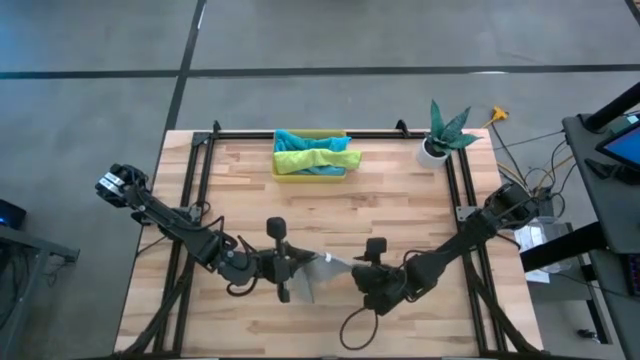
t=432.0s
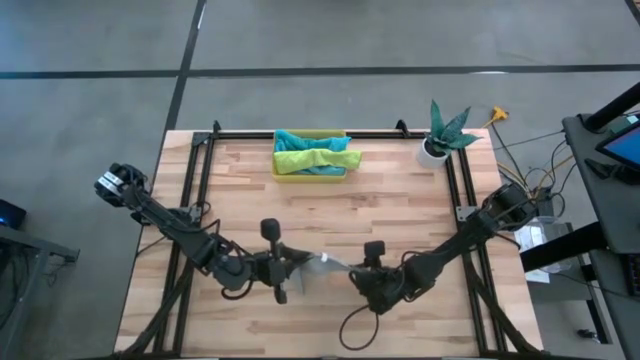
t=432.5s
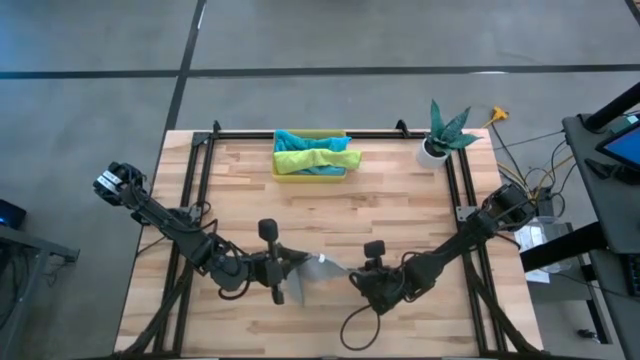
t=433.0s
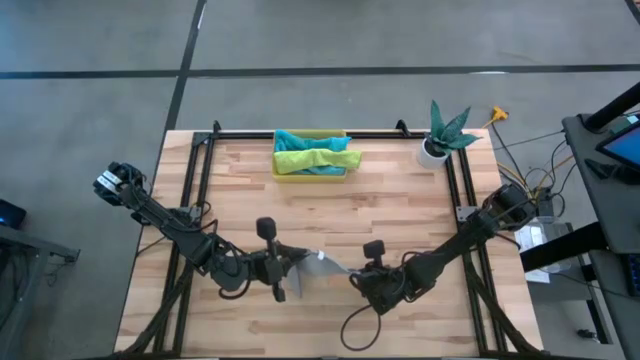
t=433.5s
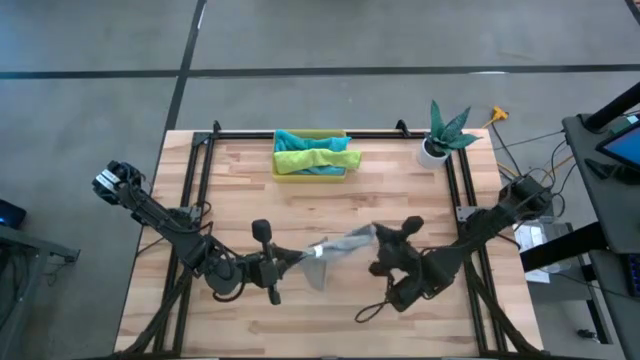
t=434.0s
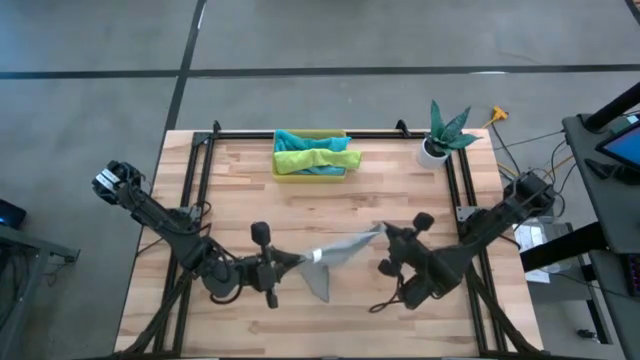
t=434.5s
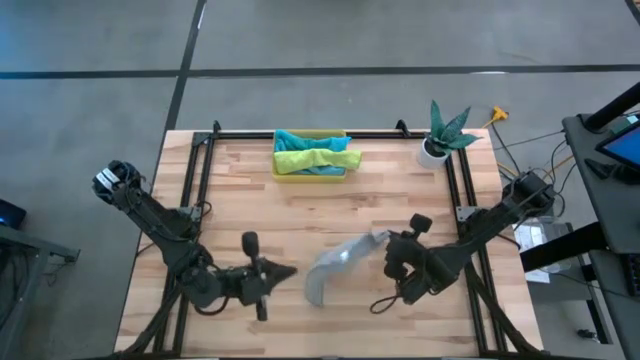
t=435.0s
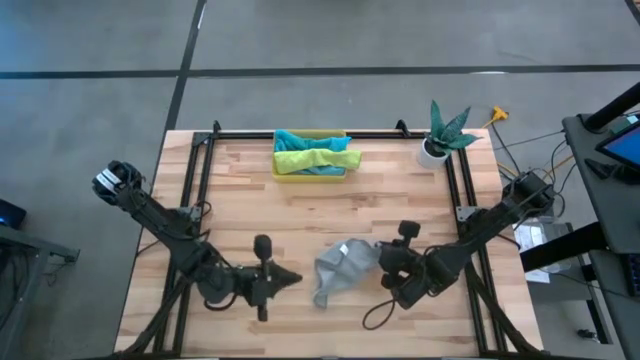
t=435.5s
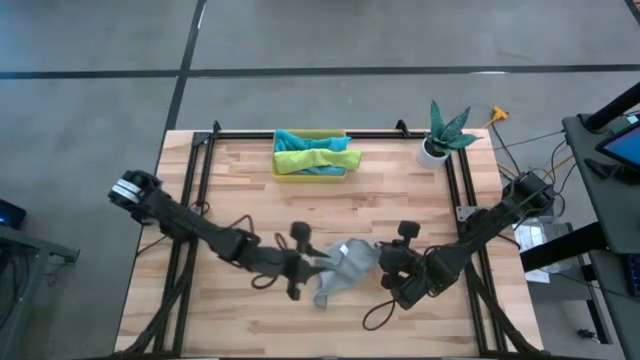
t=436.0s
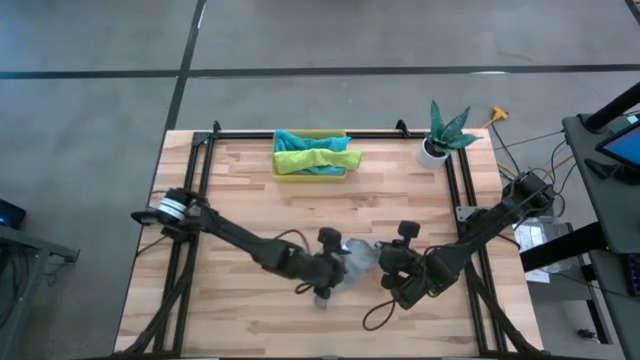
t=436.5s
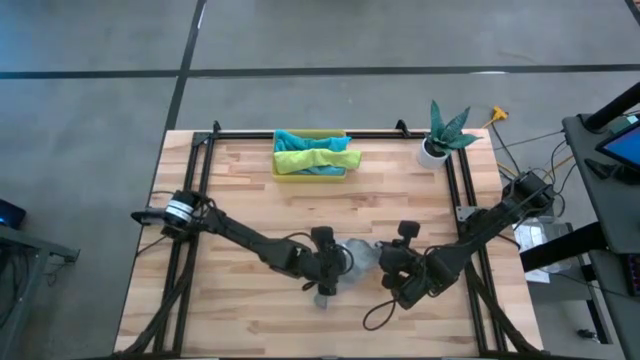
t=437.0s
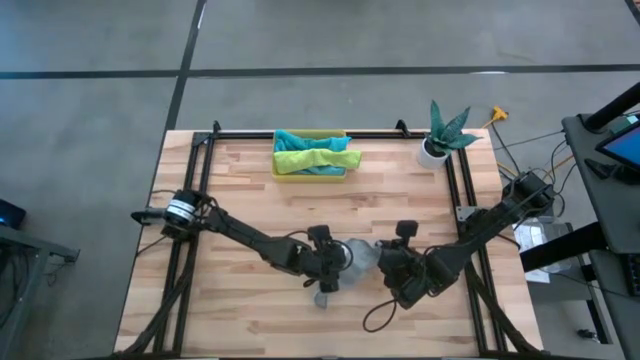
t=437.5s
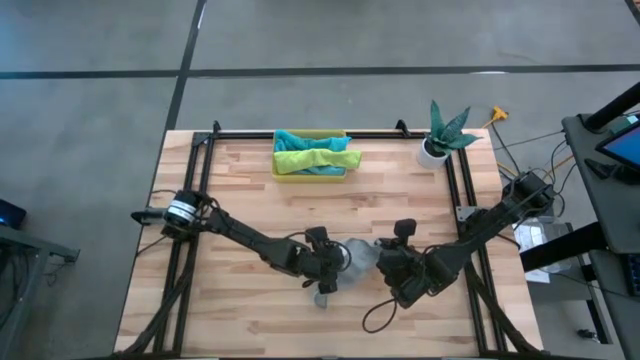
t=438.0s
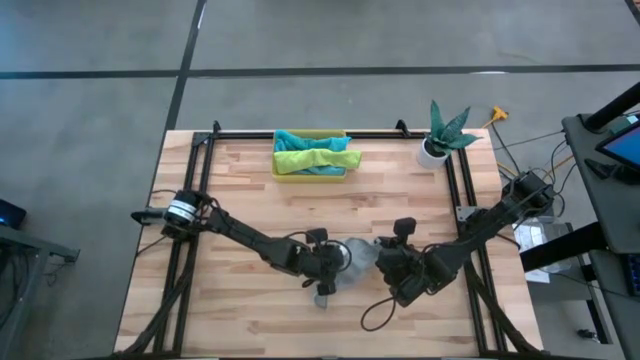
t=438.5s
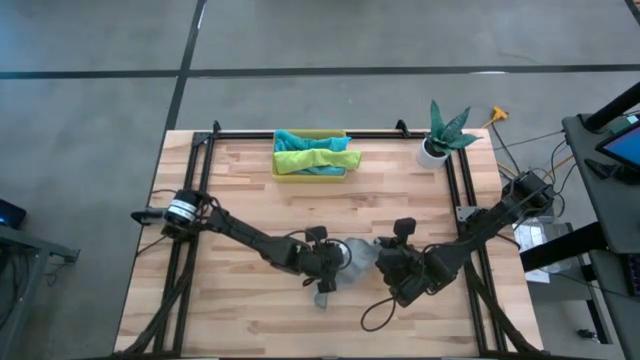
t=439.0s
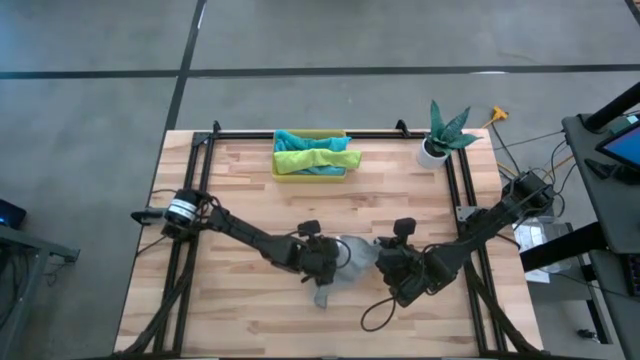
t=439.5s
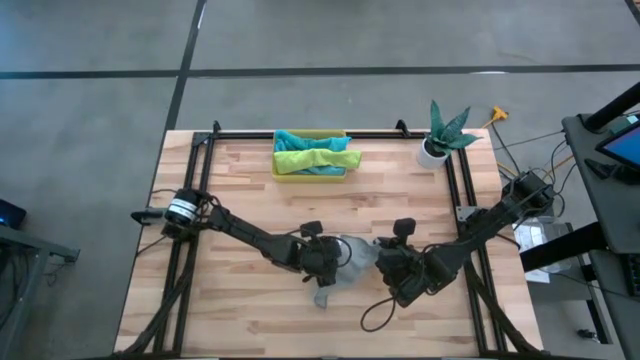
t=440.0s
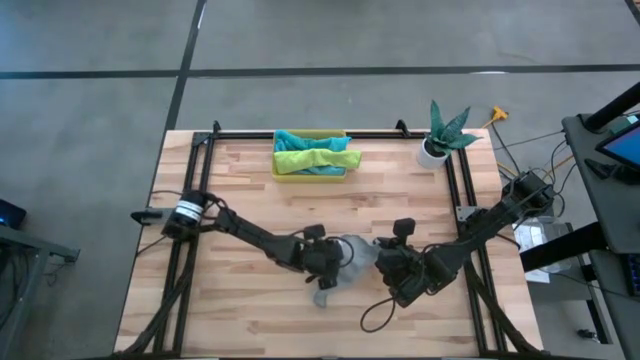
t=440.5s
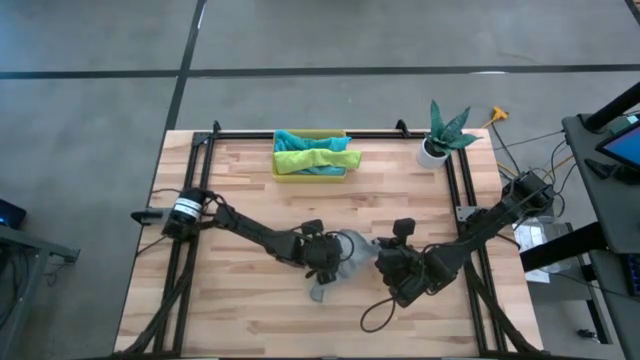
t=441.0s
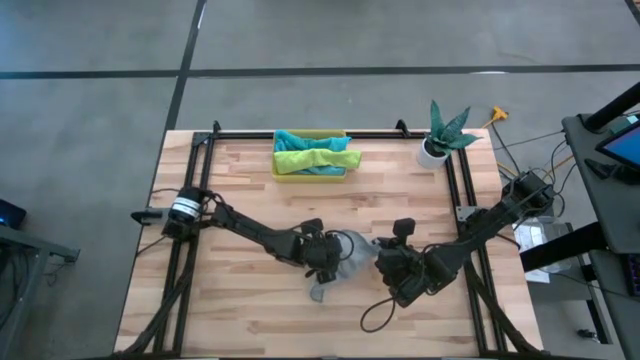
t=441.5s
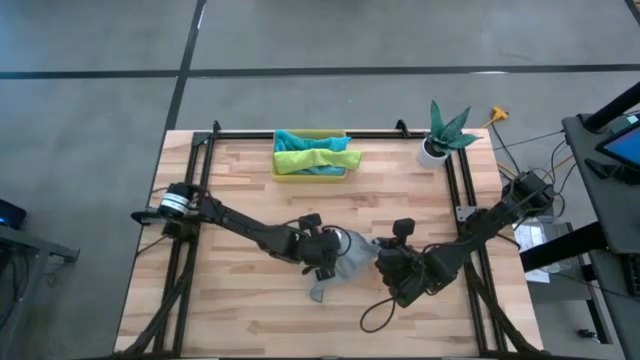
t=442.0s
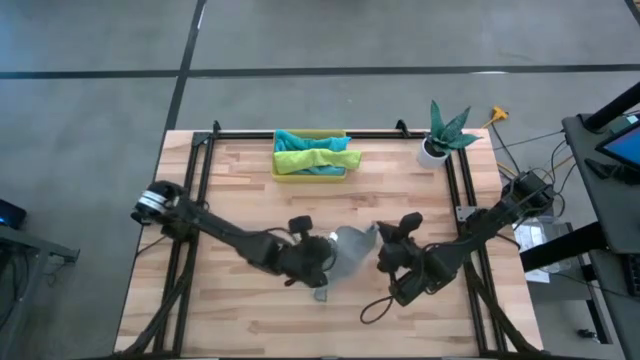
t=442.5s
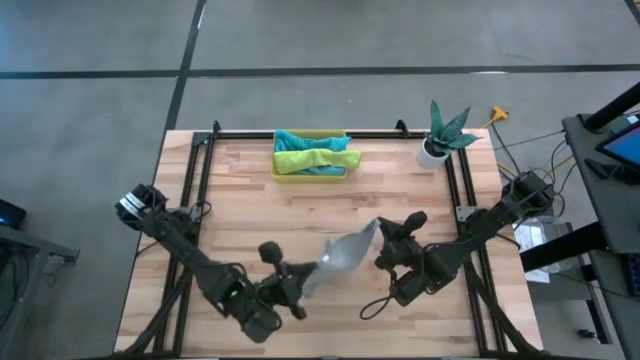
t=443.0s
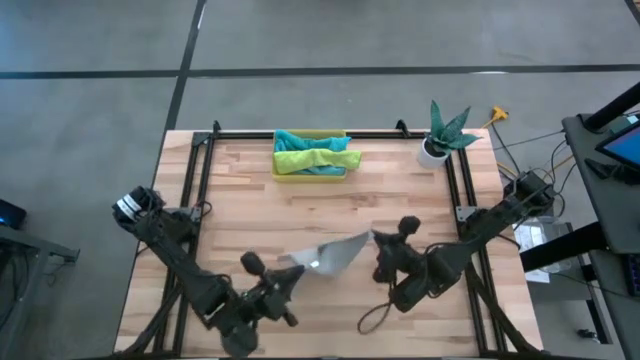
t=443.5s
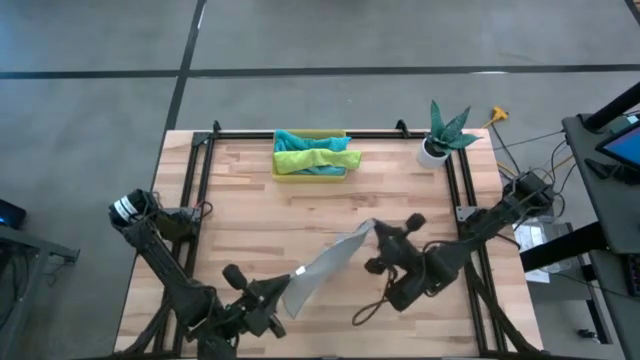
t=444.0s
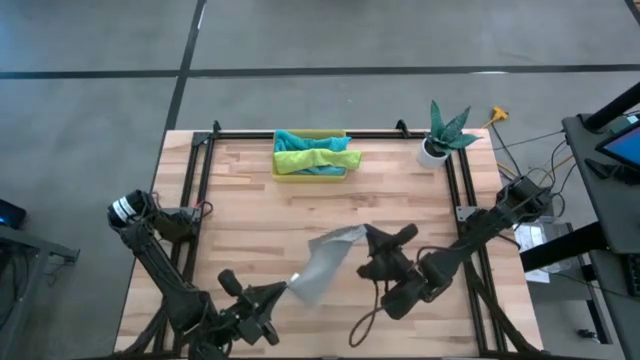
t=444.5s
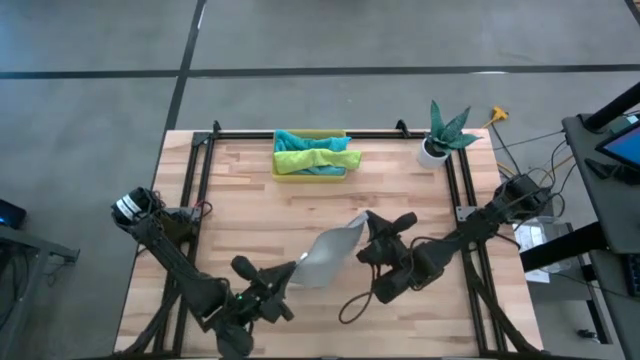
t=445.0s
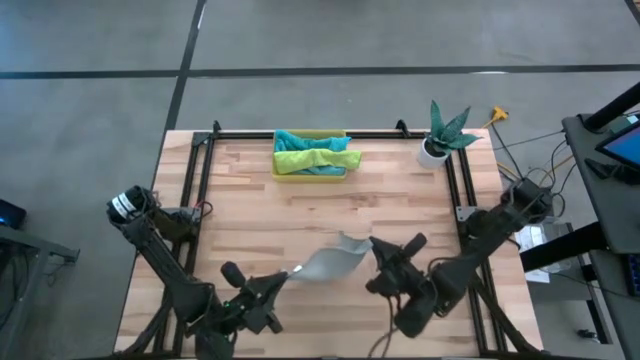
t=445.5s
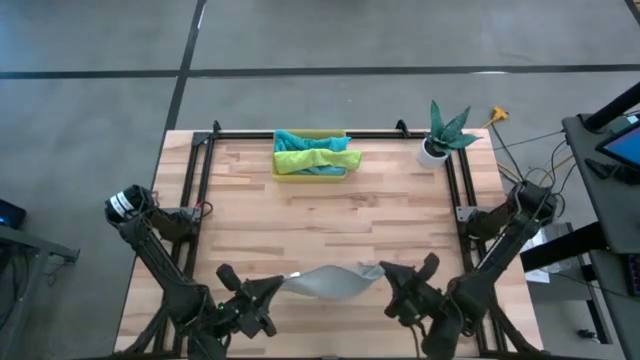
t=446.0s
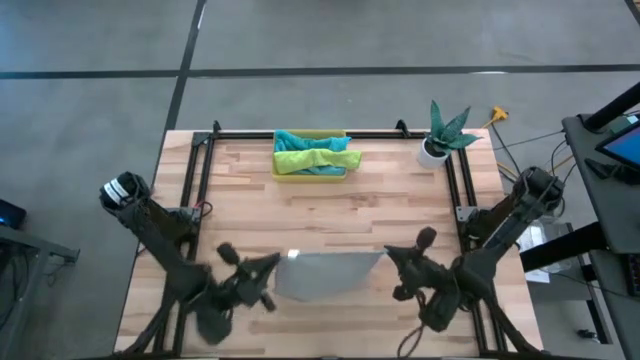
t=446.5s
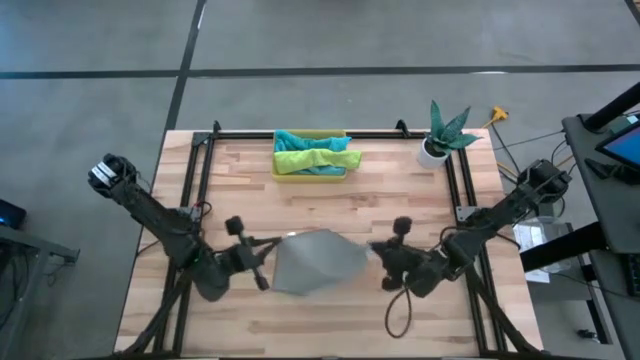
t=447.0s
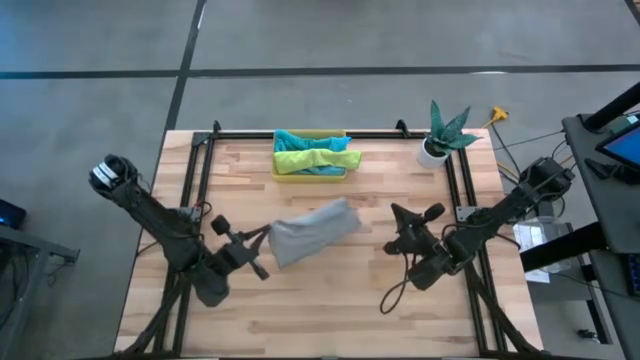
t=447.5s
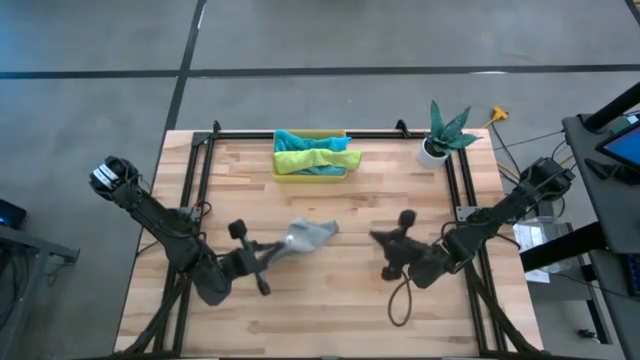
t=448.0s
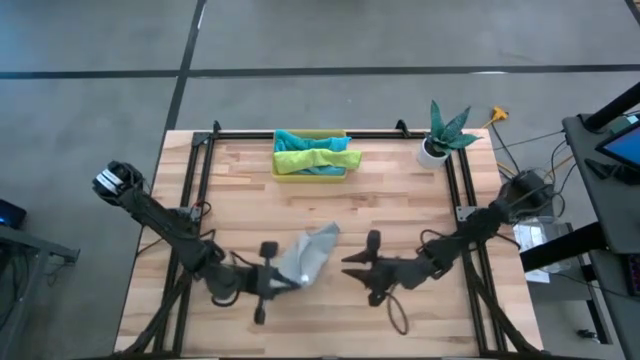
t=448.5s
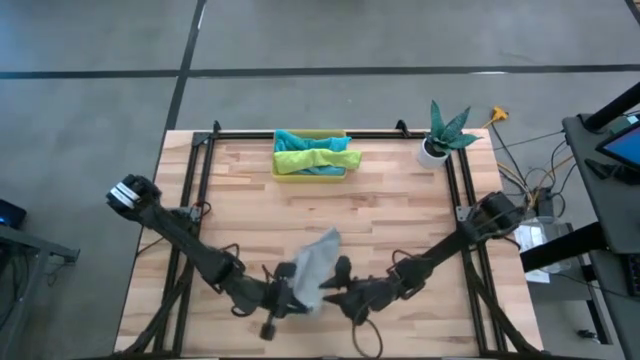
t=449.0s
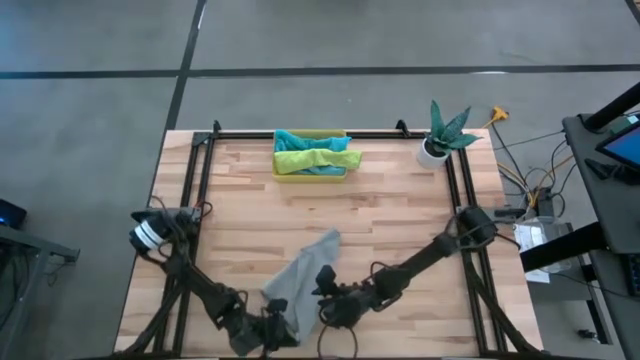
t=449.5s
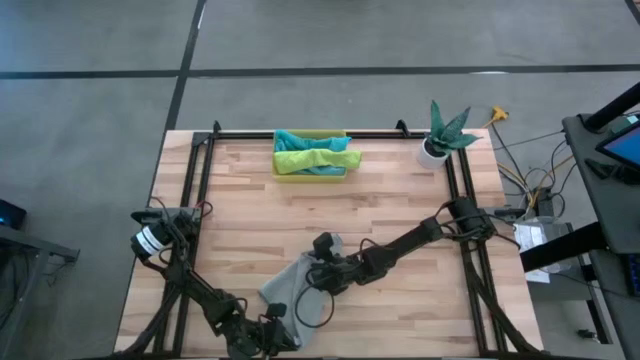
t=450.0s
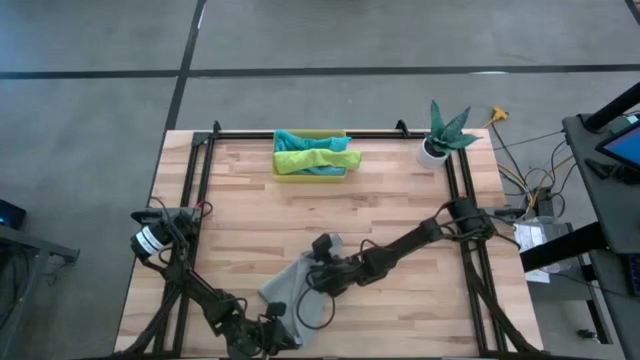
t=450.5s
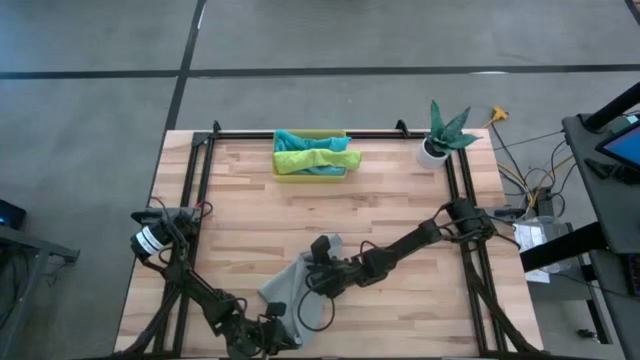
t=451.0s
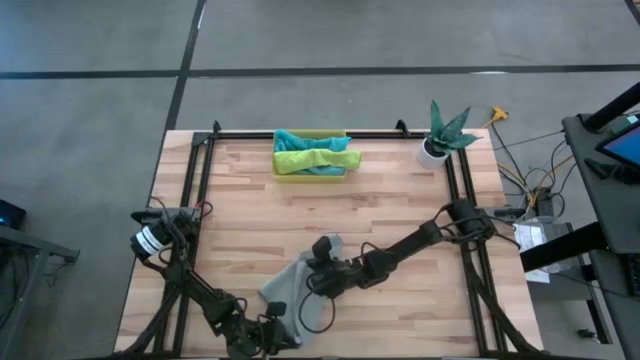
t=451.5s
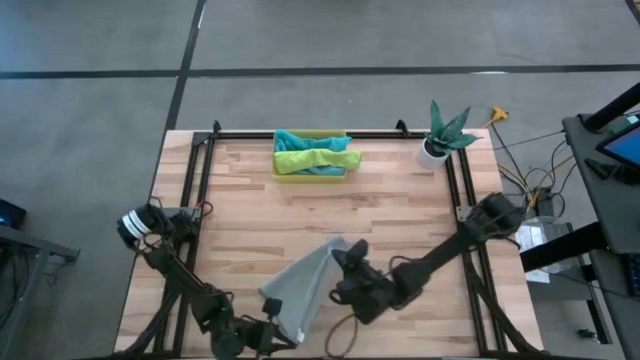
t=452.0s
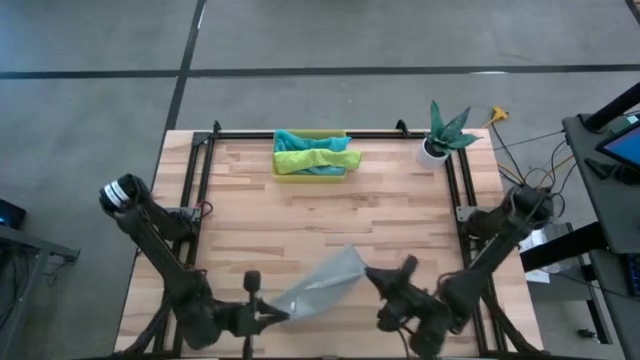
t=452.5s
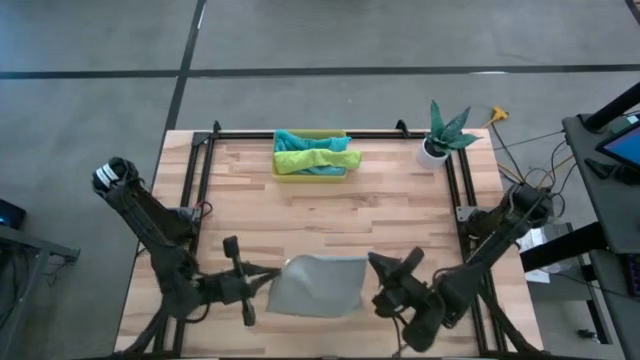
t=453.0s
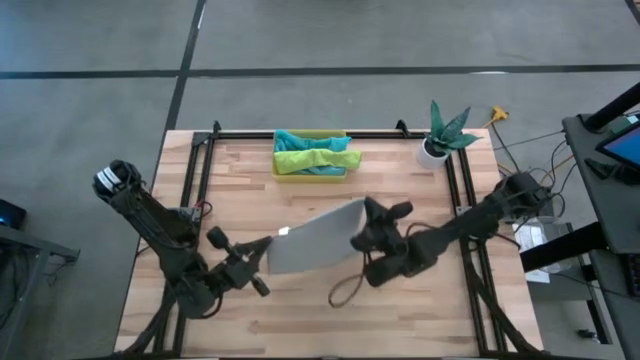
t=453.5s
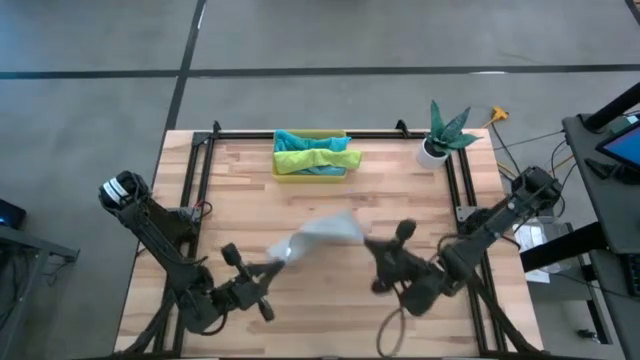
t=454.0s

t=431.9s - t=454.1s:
Task: Roll microfiber towels into tight, uniform cylinder then place into a basket
Roll the gray towel
